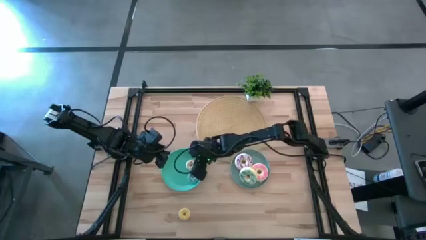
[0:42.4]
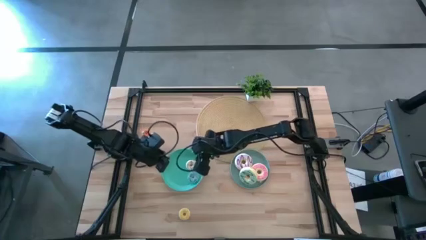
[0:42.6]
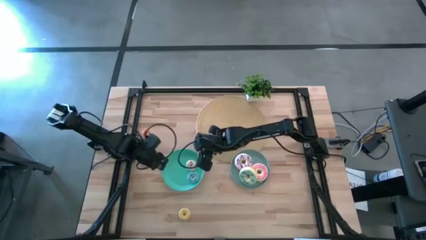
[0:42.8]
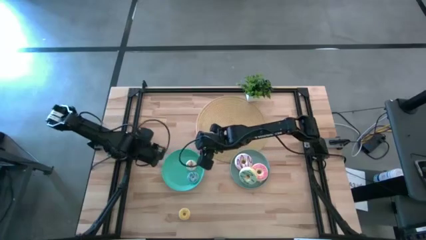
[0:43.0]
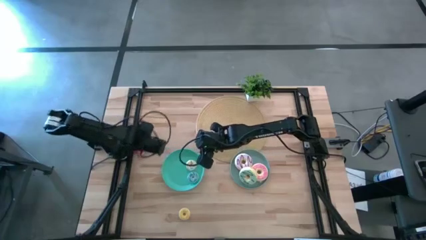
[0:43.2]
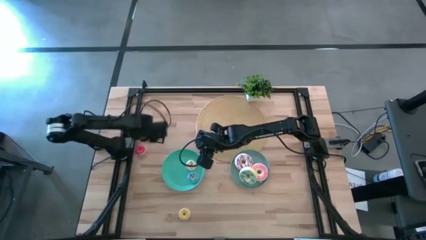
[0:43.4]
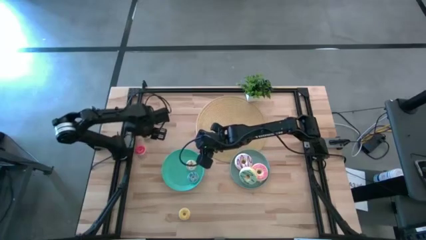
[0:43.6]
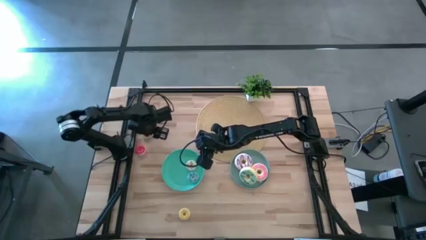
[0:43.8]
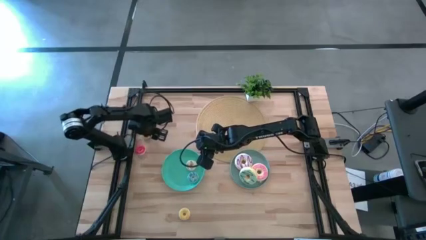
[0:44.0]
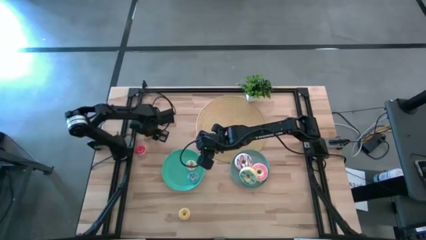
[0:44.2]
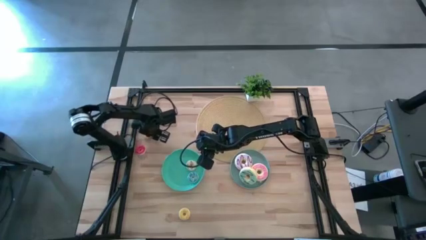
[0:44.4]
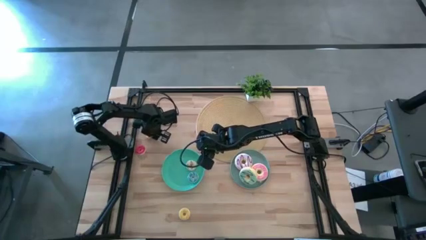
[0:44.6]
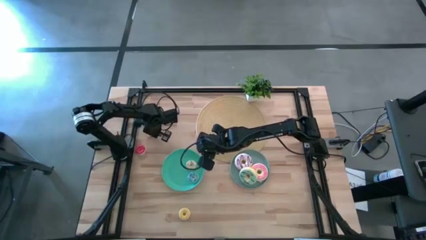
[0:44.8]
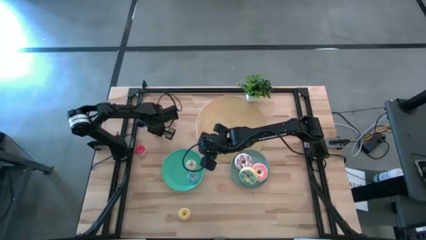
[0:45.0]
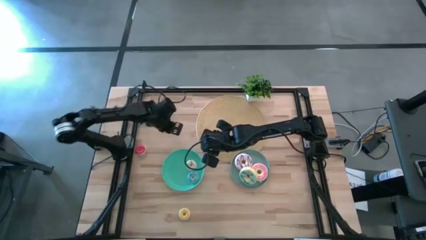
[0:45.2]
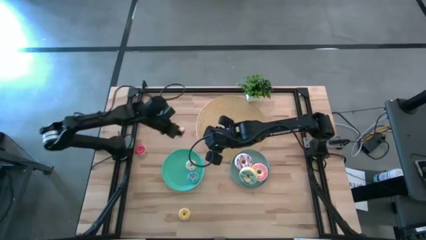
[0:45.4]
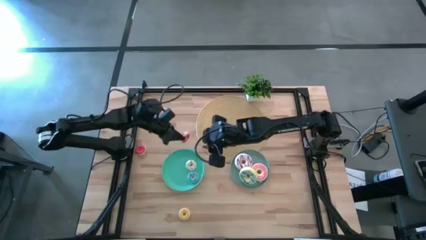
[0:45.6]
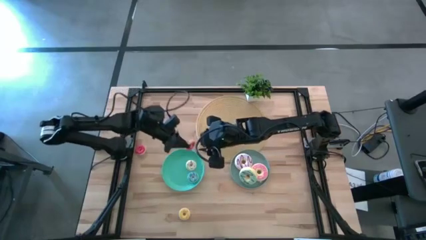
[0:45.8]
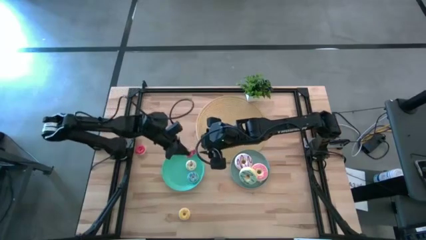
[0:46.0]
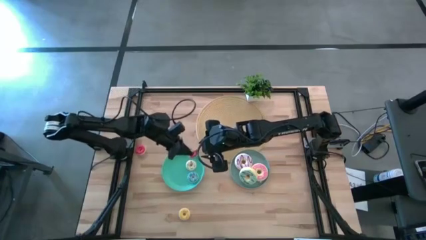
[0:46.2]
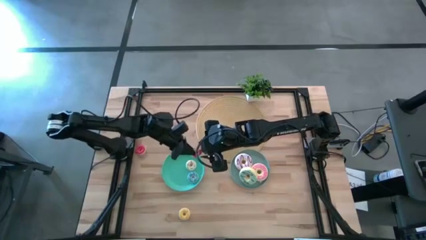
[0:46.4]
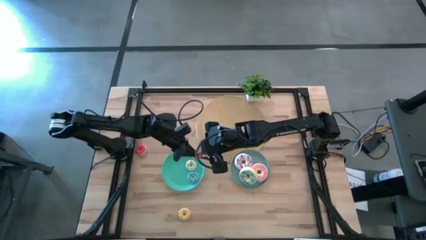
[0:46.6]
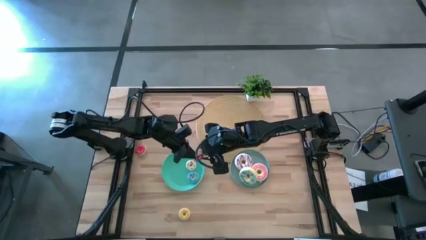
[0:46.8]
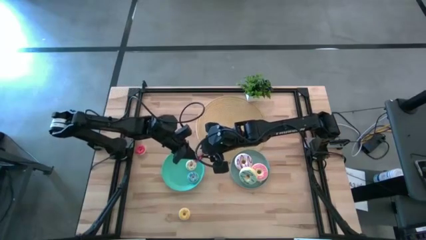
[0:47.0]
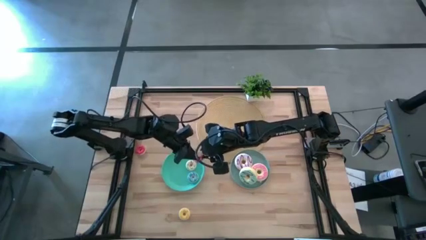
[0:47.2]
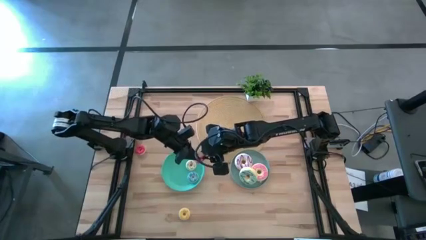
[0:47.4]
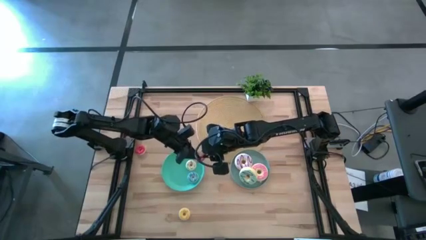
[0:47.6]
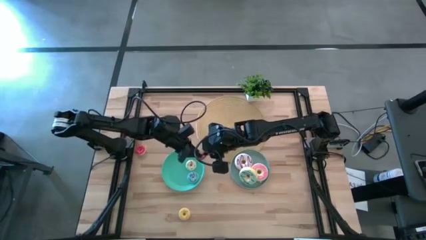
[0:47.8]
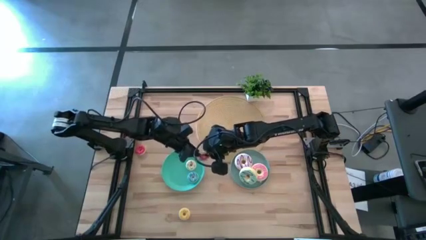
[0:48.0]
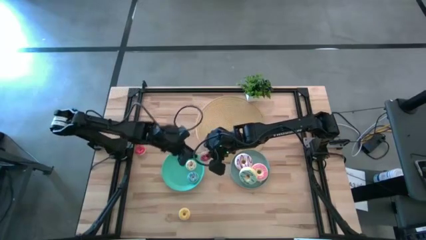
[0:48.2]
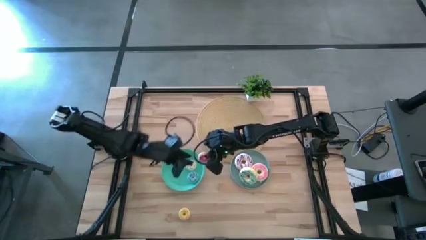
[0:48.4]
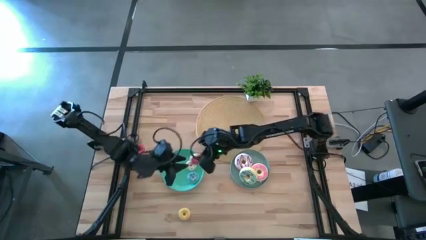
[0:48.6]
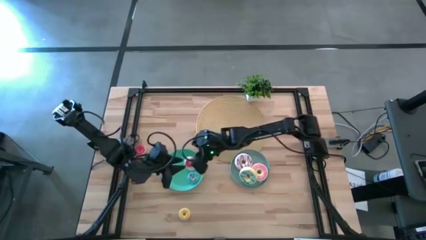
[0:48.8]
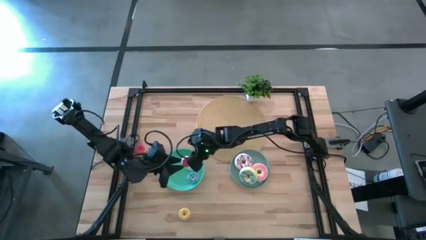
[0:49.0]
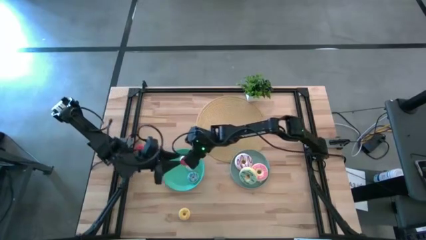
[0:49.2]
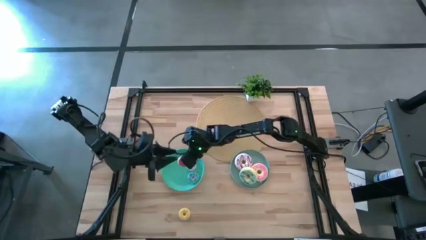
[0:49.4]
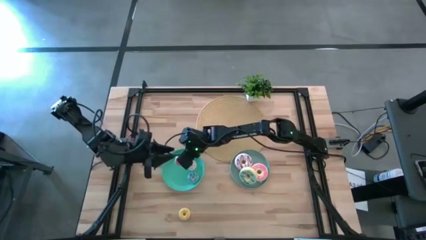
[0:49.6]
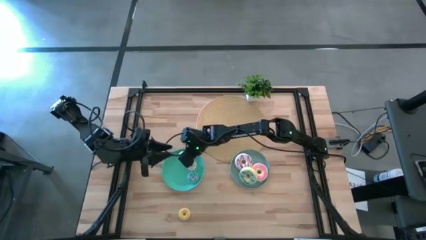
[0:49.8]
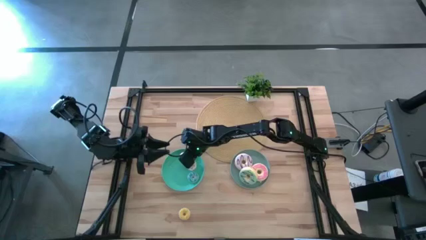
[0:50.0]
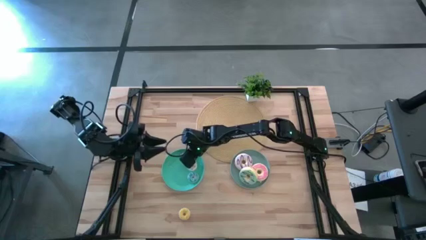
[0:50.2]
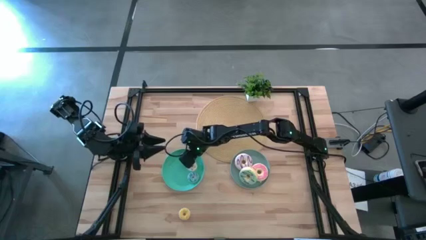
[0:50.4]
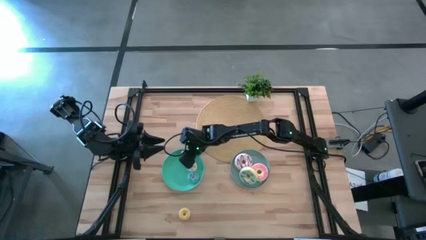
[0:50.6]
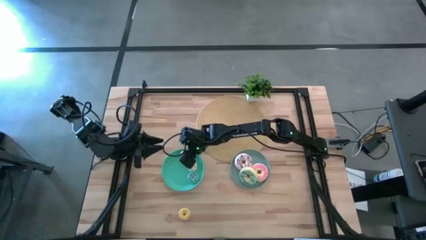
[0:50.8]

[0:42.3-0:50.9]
Task: Pick & Place donuts
Put the small orange donut on the blue plate

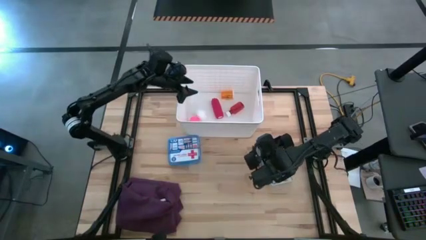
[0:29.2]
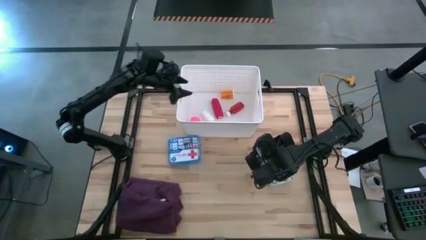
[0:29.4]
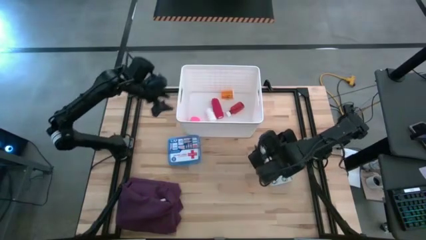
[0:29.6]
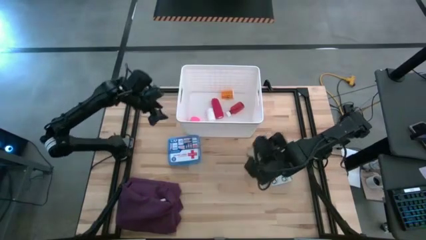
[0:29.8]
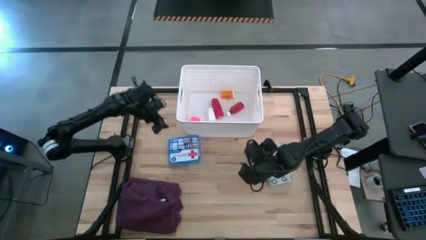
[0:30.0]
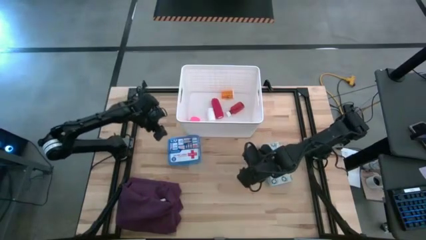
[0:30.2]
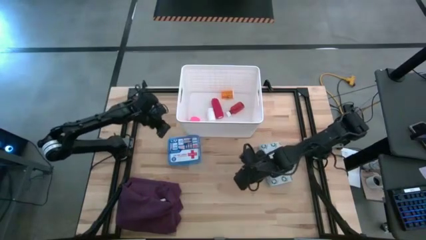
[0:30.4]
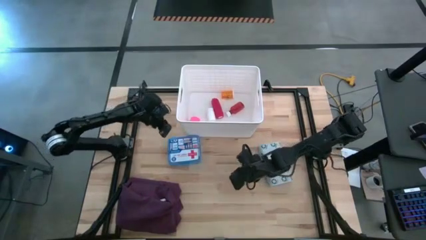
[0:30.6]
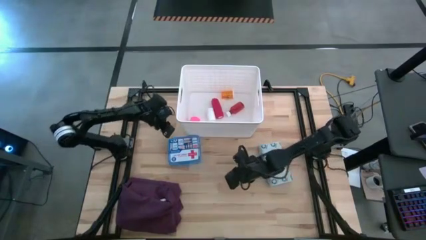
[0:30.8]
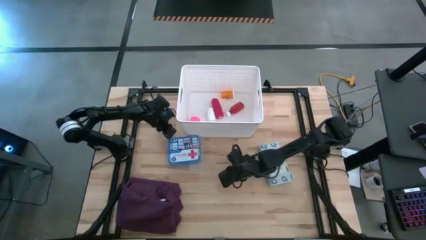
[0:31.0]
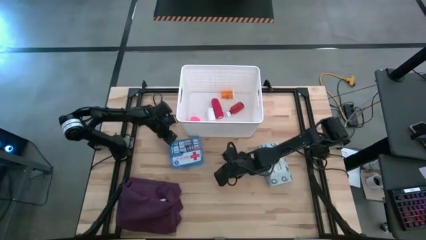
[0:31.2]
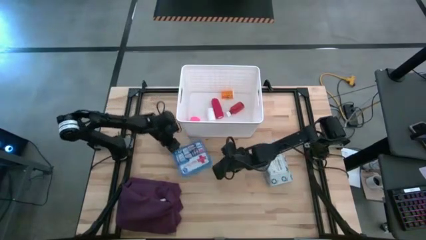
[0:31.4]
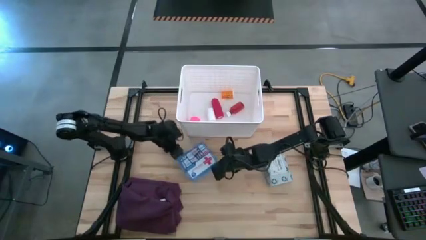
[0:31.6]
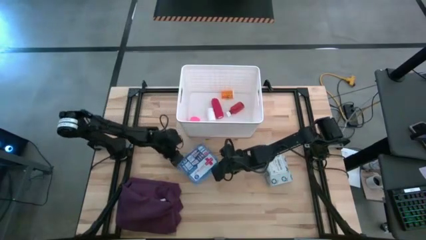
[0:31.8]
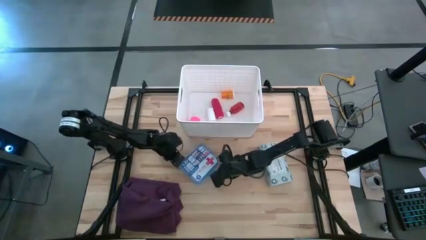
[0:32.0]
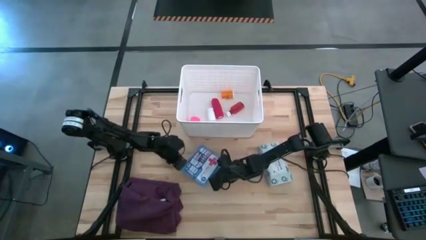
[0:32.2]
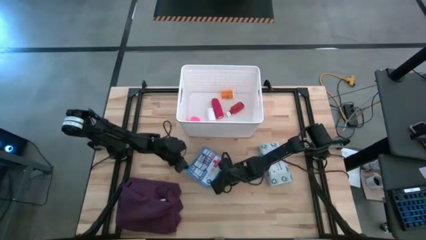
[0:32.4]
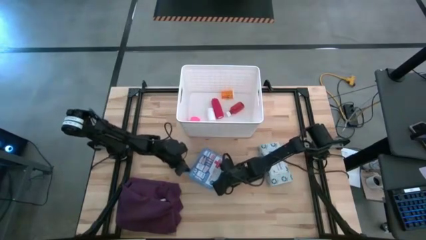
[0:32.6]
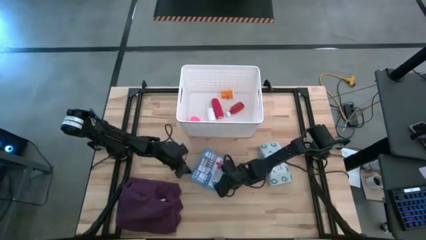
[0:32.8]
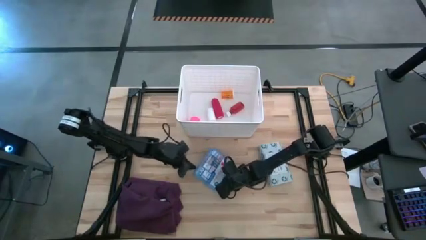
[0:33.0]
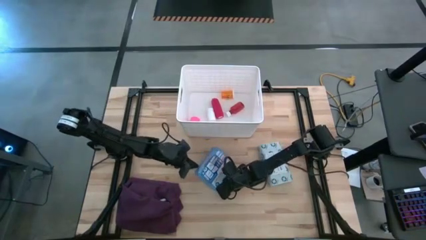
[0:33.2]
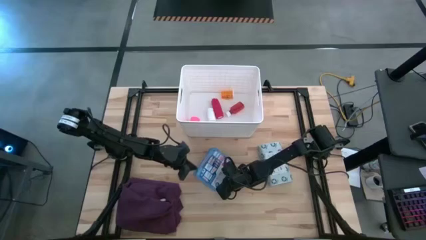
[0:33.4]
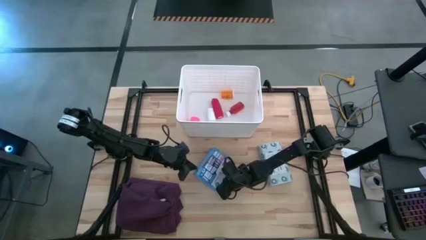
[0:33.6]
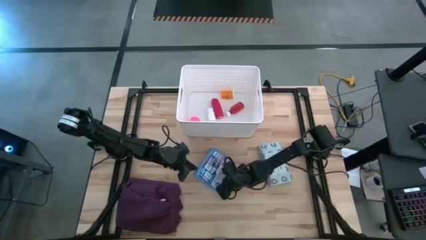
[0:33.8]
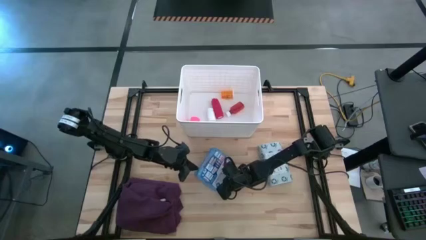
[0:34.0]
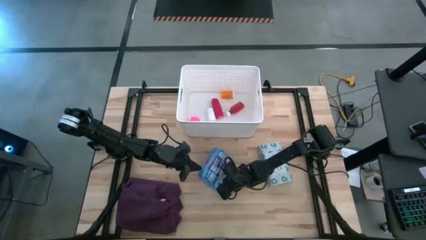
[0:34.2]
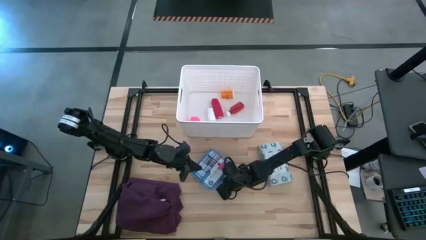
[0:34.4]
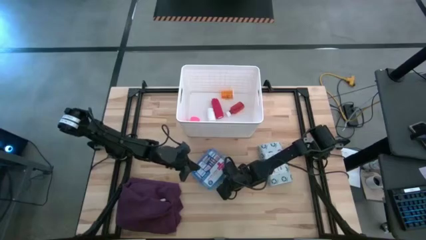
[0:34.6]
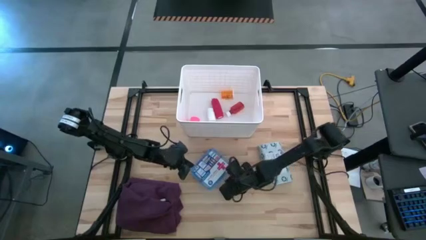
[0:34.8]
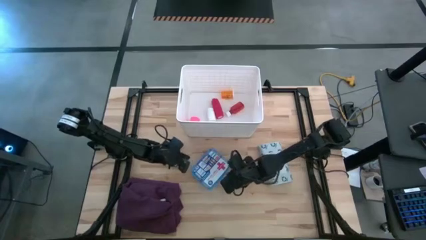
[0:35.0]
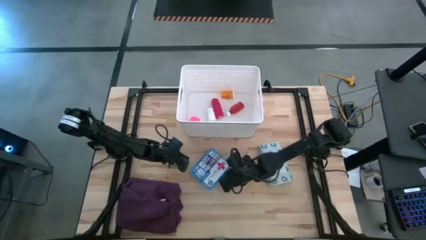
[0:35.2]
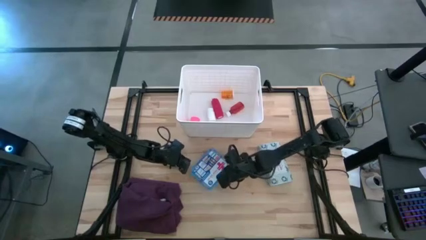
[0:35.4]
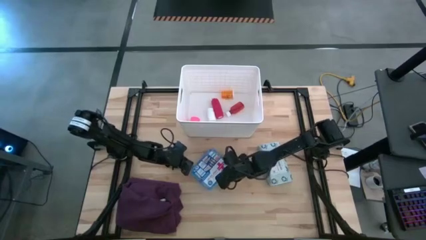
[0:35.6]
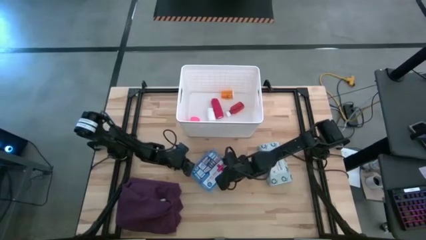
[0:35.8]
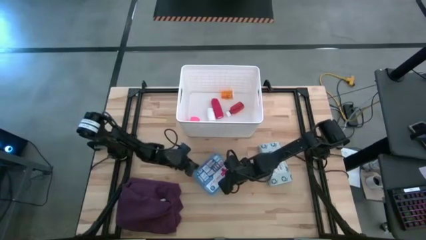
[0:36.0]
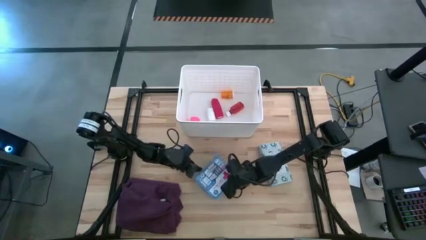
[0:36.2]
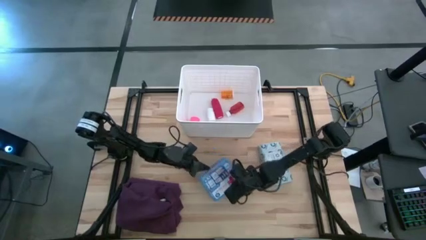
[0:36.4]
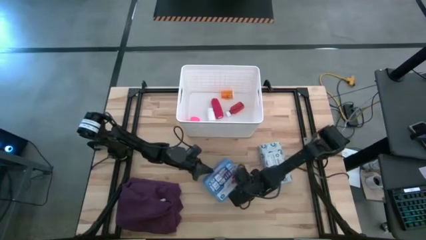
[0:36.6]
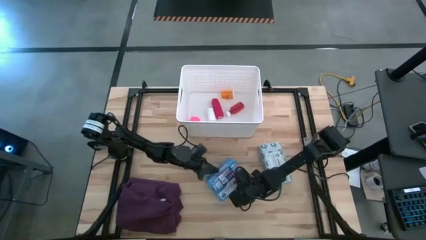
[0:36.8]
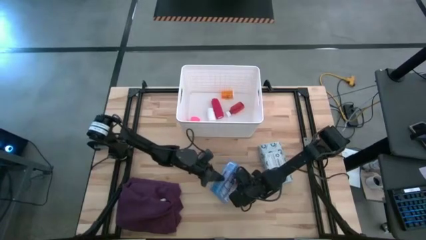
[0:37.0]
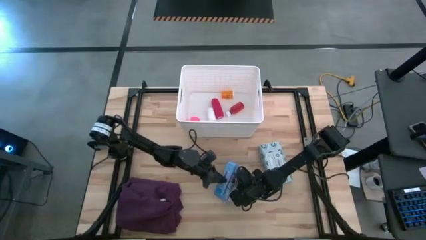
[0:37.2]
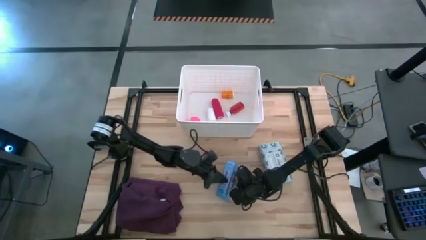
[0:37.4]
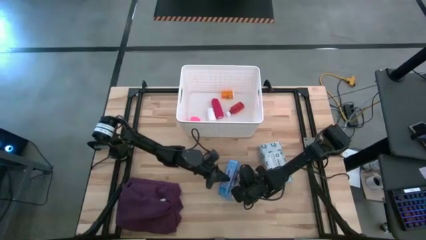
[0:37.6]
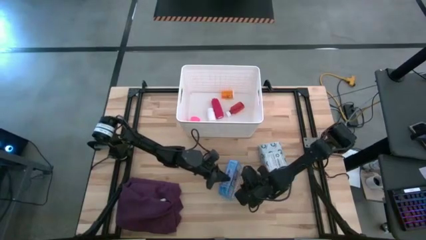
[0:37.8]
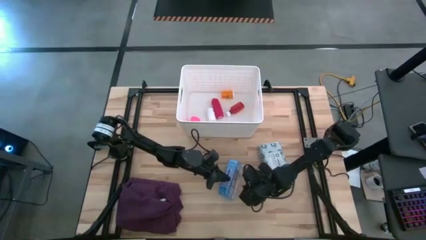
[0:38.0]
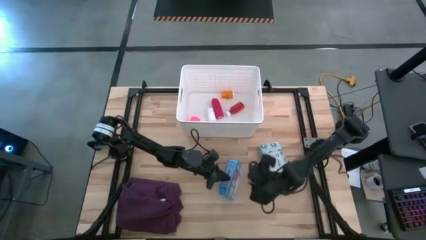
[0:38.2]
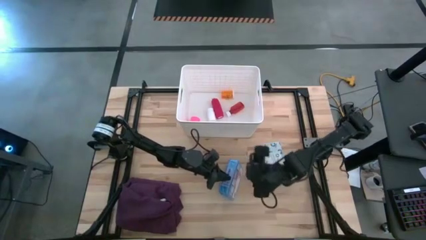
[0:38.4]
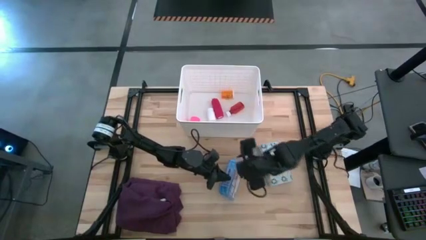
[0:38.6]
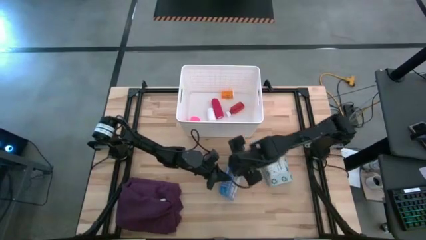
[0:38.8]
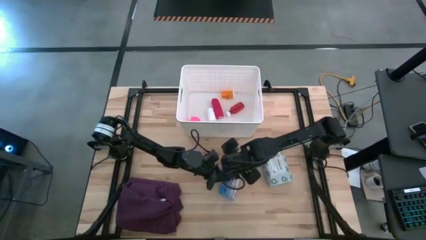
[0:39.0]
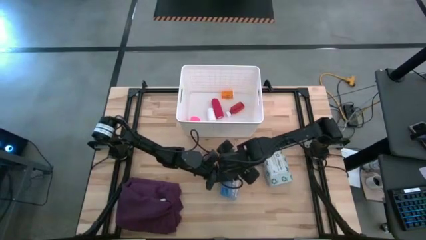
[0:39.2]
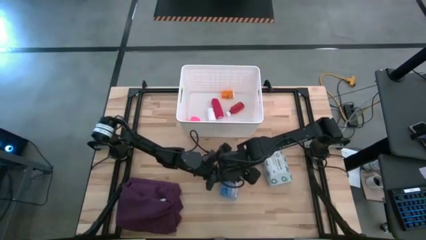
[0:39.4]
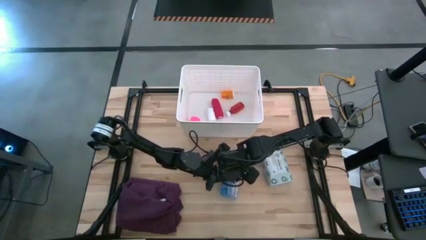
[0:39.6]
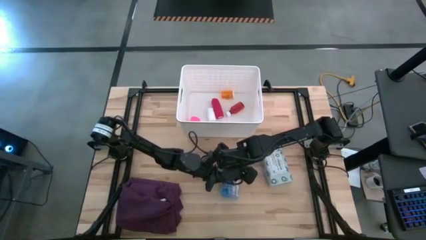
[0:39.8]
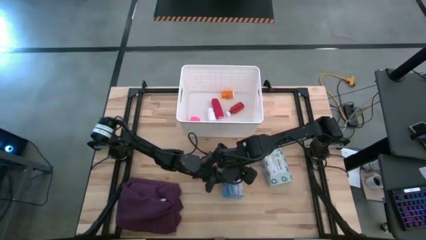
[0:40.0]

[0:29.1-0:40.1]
Task: Pick & place medical supplies in basket/bin
Put the blue first aid kit box into the white bin
